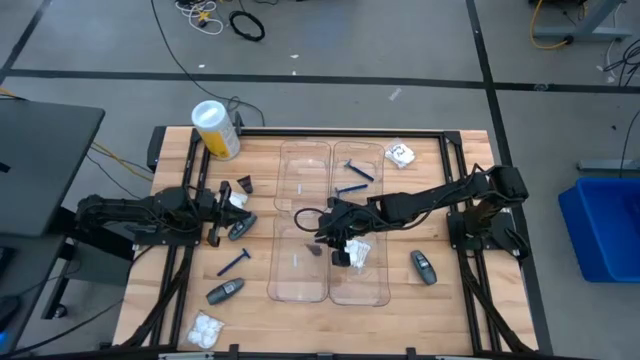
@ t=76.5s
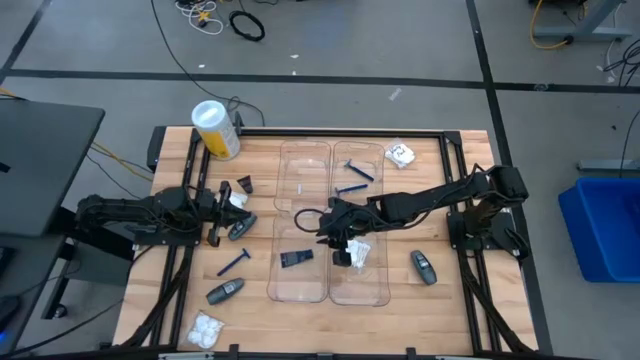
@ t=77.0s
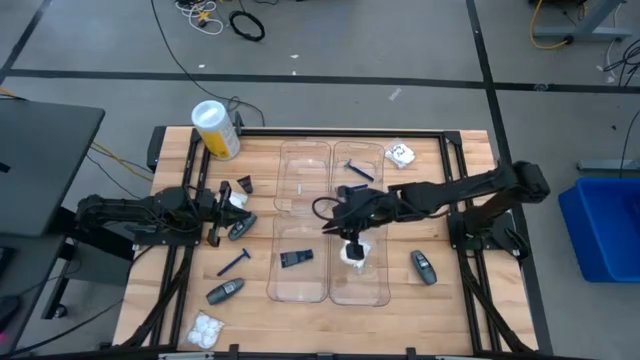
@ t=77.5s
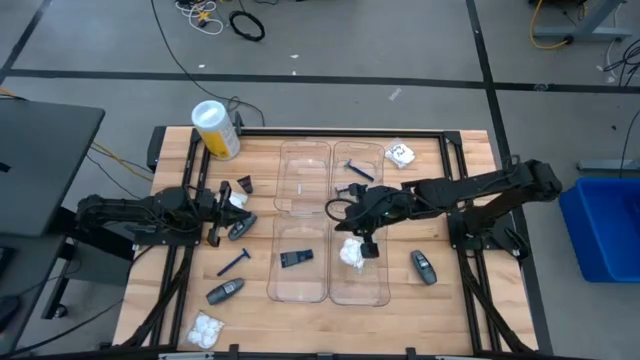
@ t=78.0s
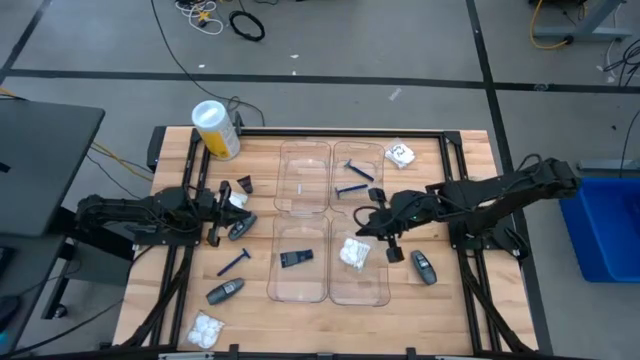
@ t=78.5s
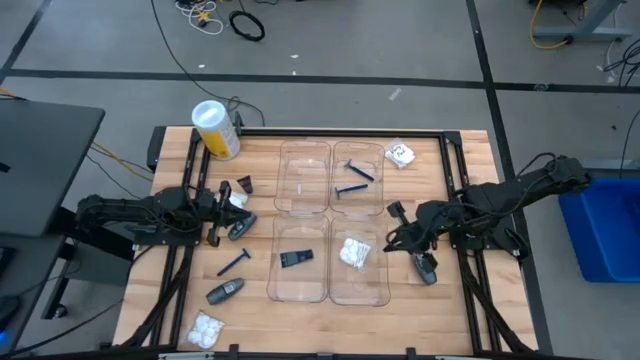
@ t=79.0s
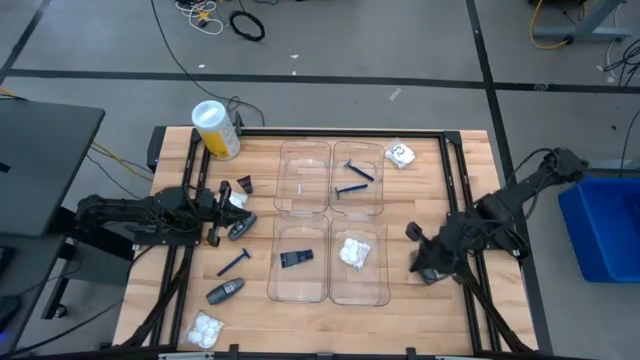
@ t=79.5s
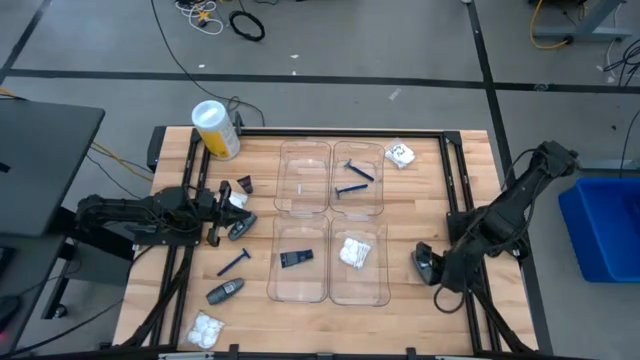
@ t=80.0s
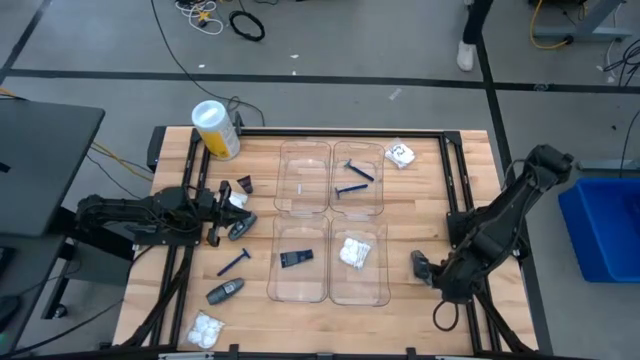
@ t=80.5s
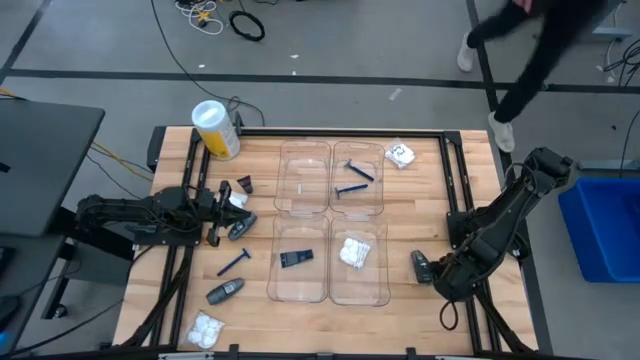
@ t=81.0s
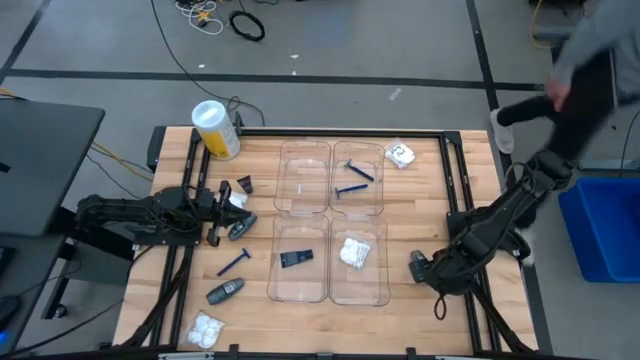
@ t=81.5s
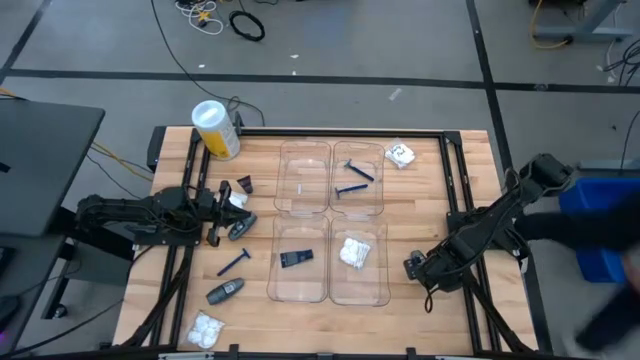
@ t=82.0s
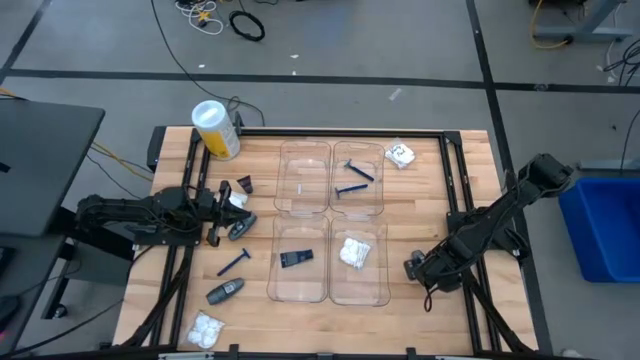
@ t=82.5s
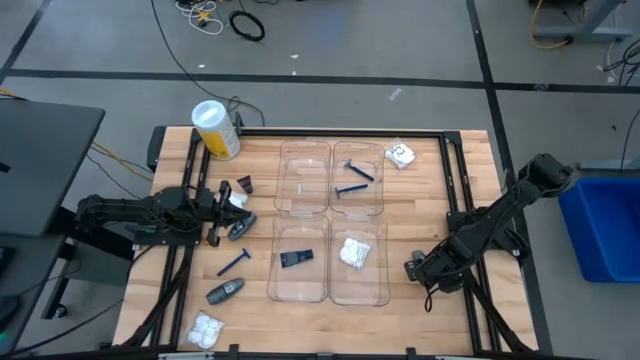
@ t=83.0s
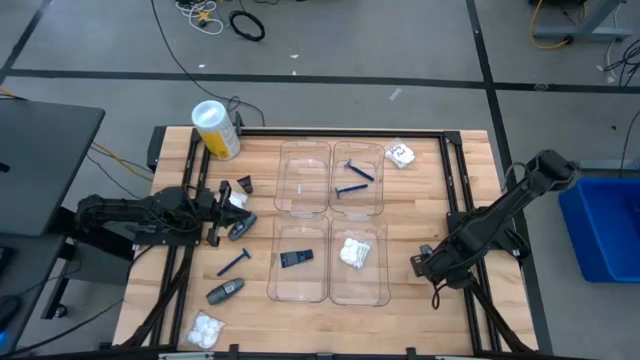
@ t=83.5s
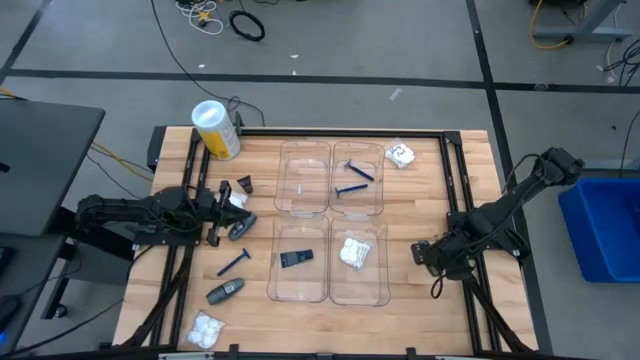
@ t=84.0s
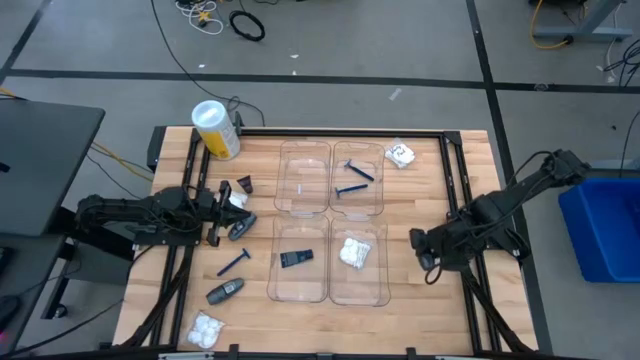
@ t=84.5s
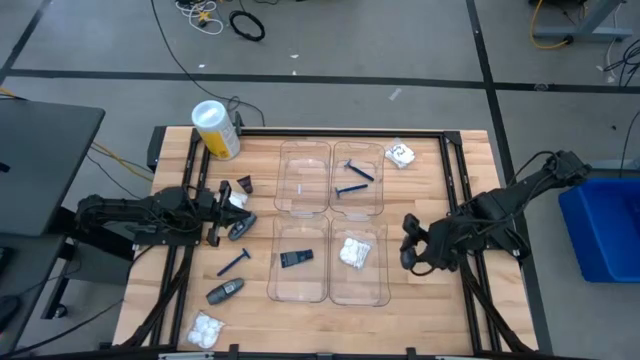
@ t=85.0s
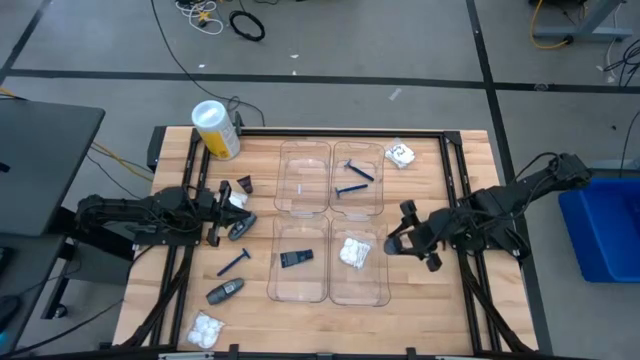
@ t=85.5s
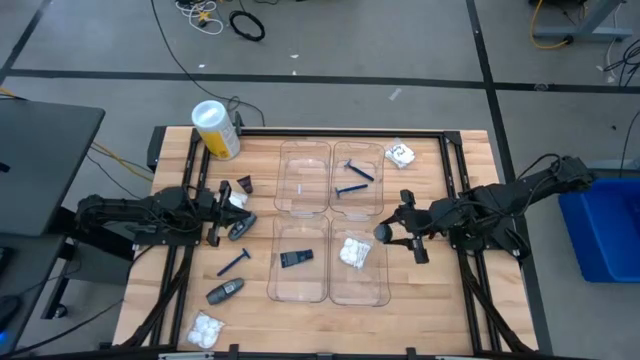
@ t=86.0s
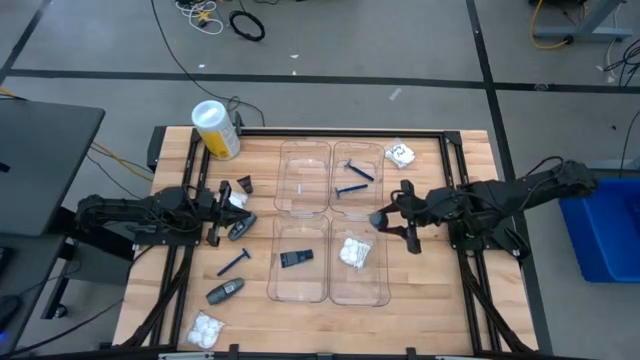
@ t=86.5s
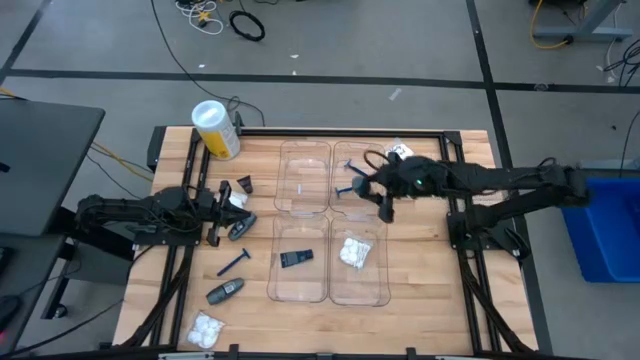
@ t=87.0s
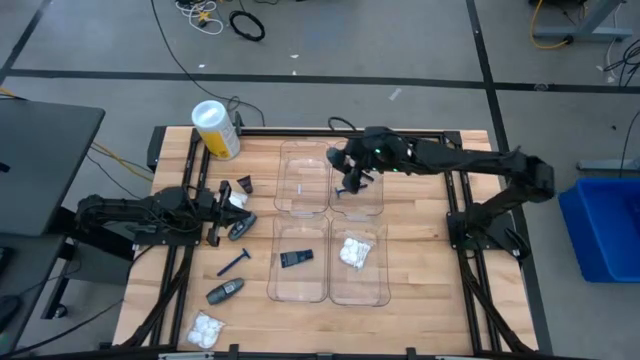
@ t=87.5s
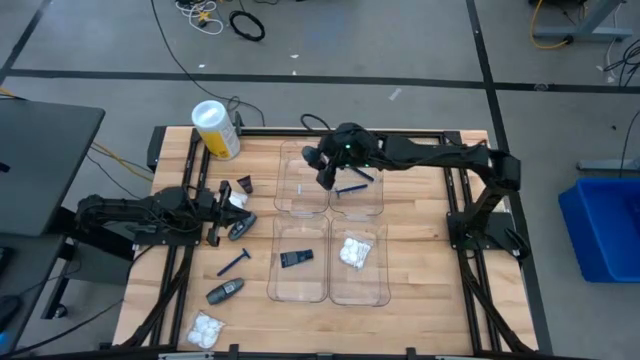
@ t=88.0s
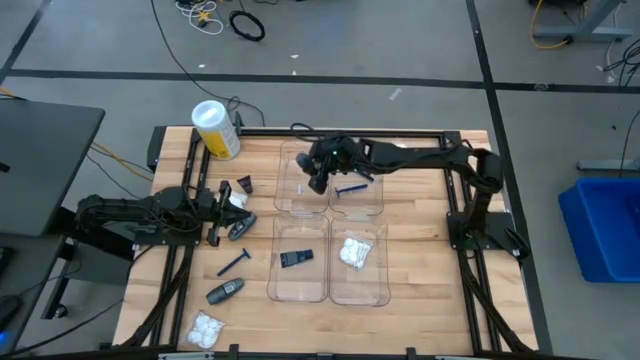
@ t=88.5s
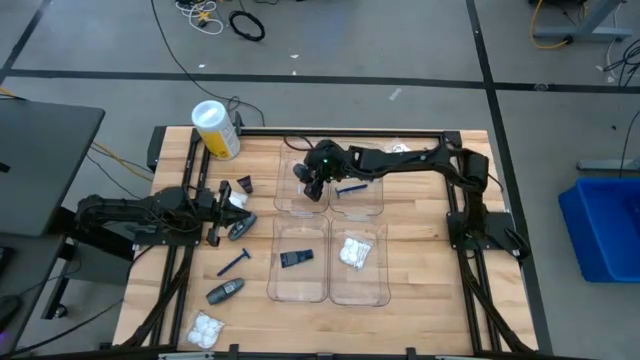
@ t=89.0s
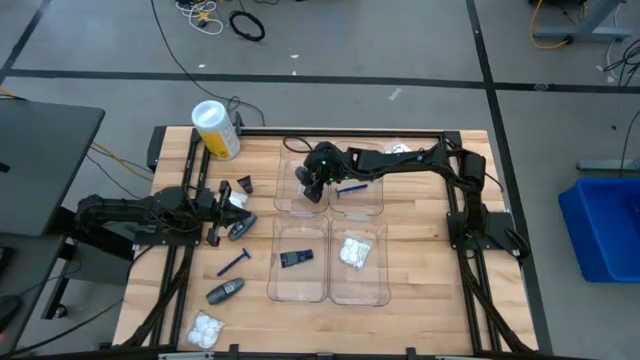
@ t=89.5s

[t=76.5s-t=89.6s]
Task: Pick & Place Travel size toiletries
Put the right deodorant into the top left transparent bin
